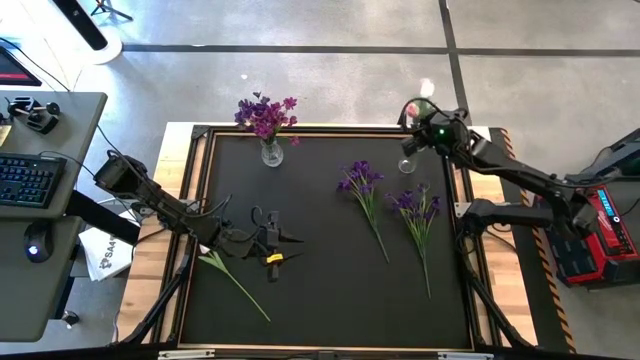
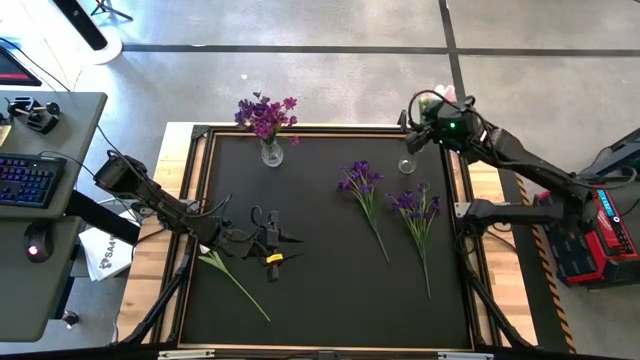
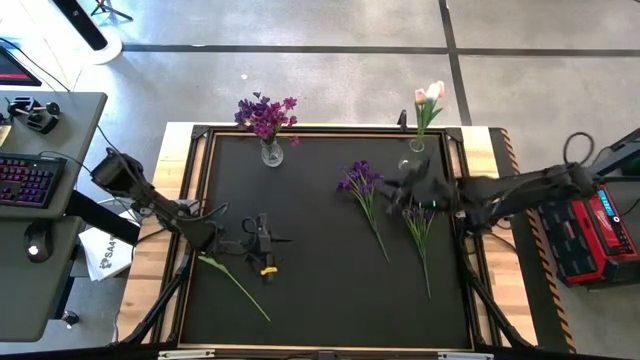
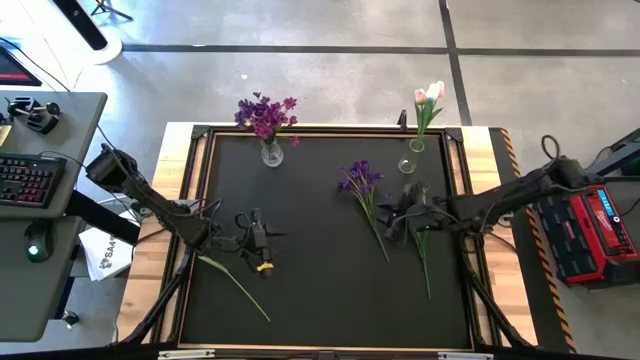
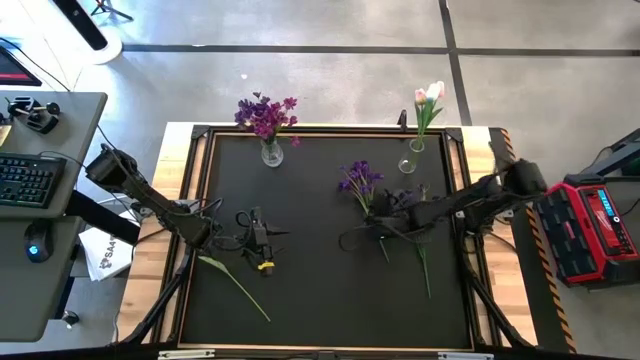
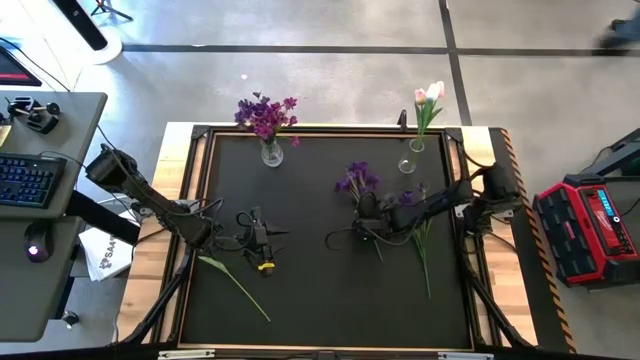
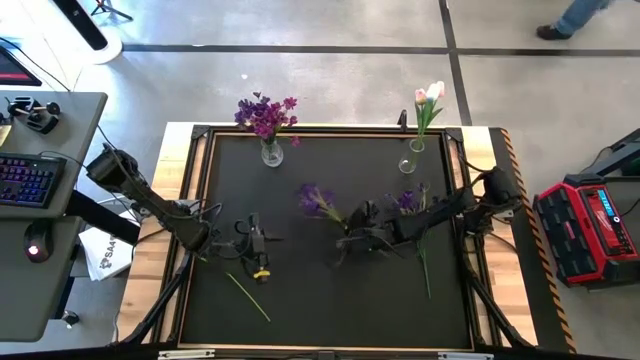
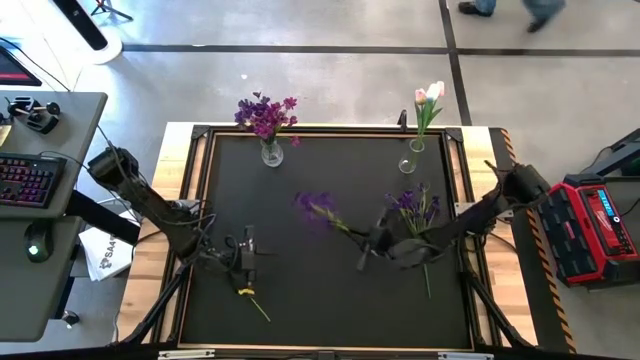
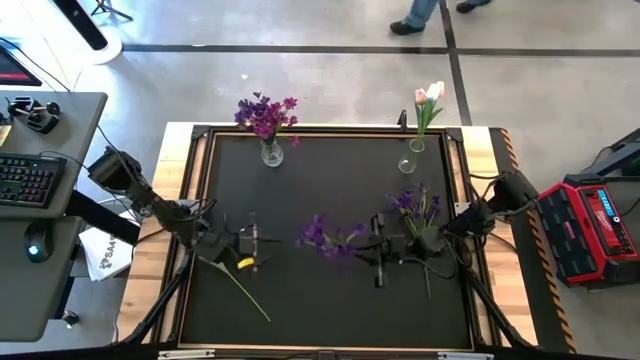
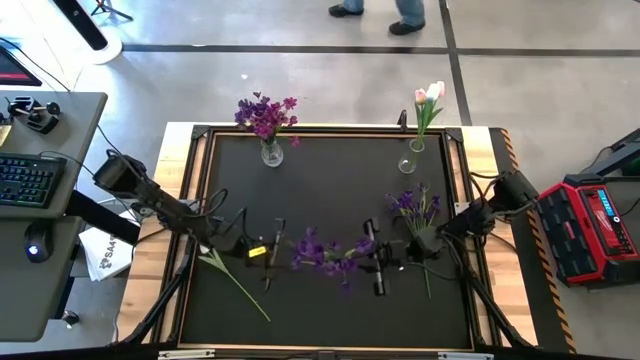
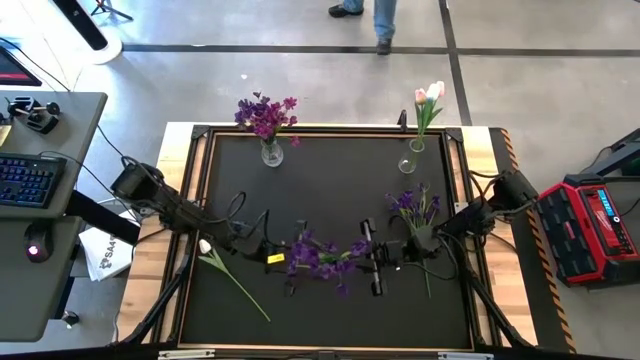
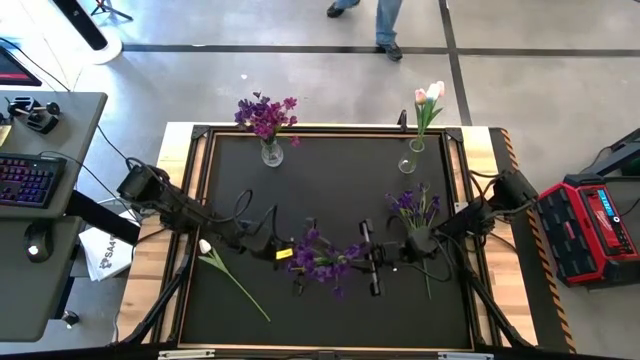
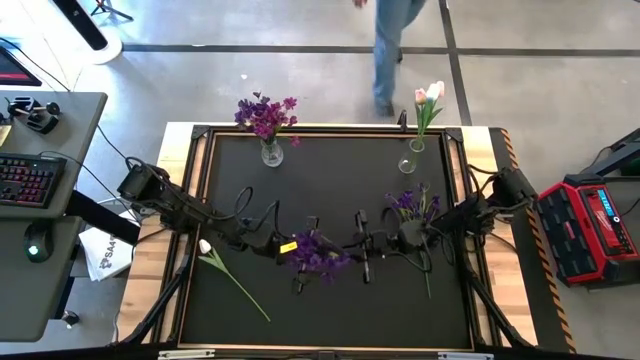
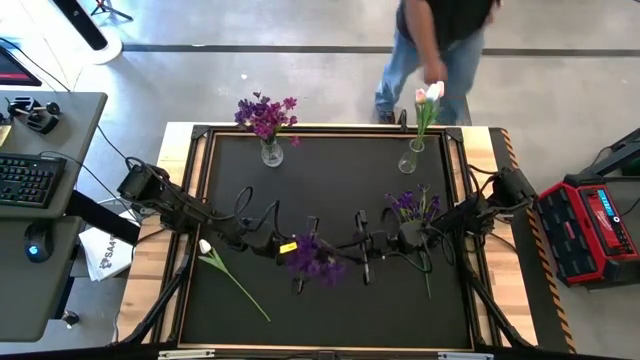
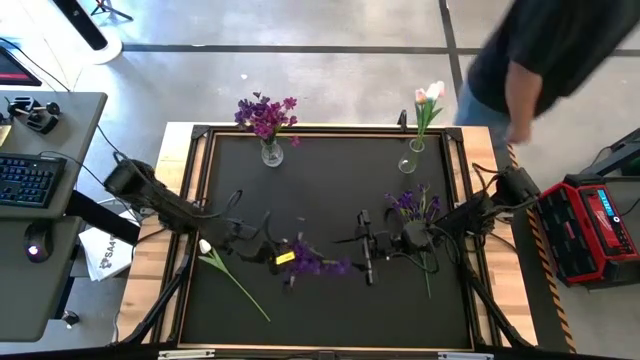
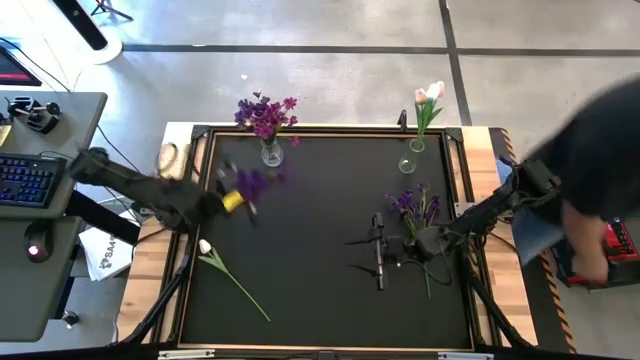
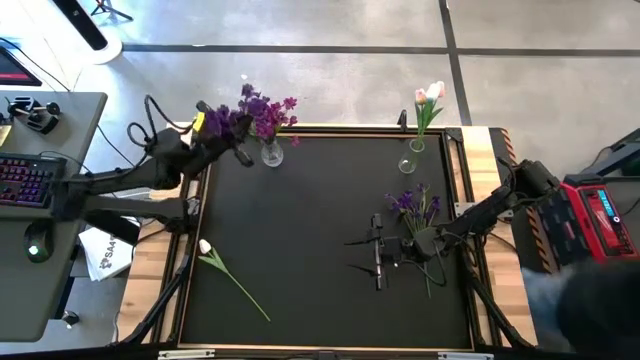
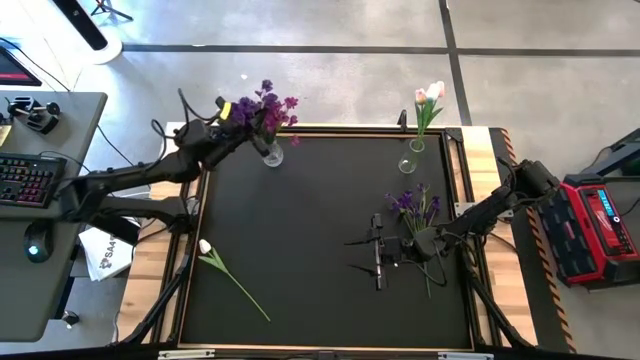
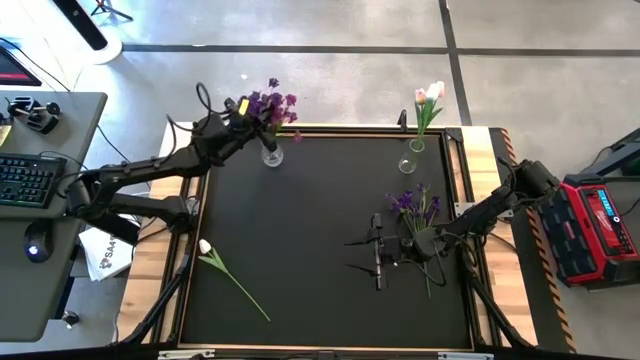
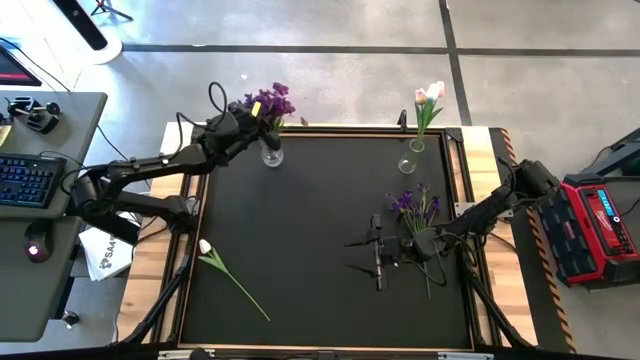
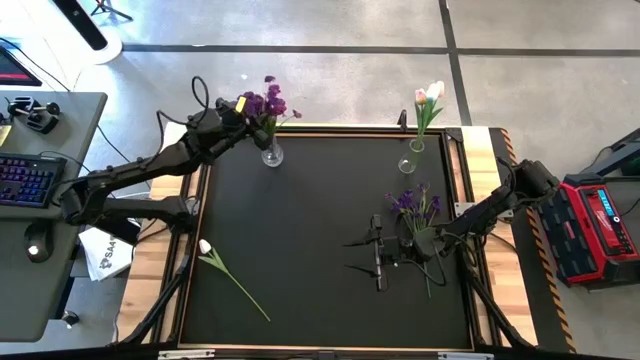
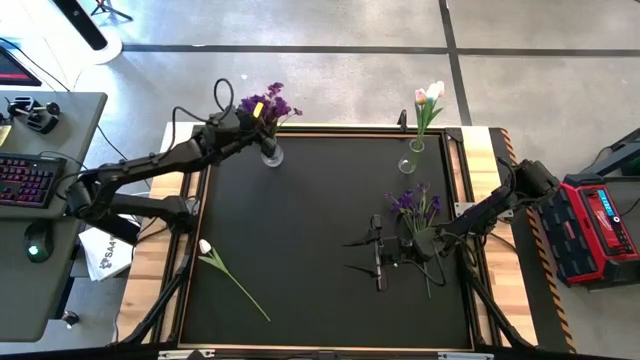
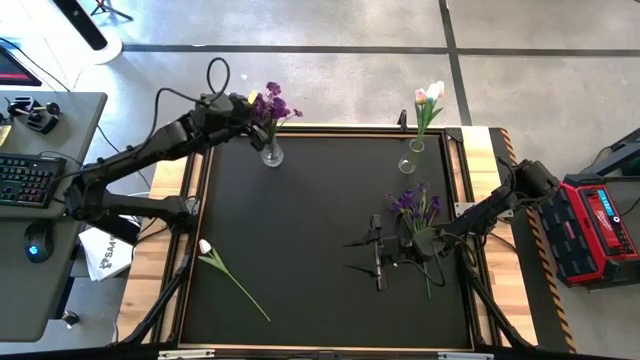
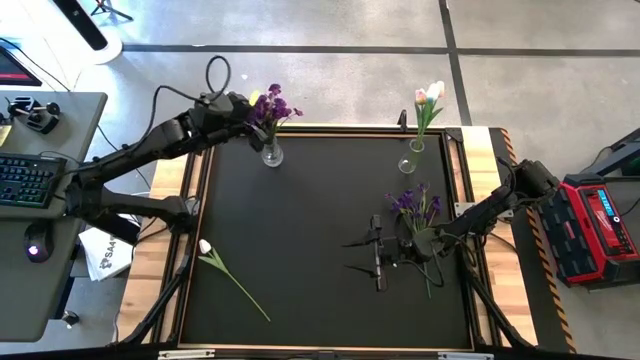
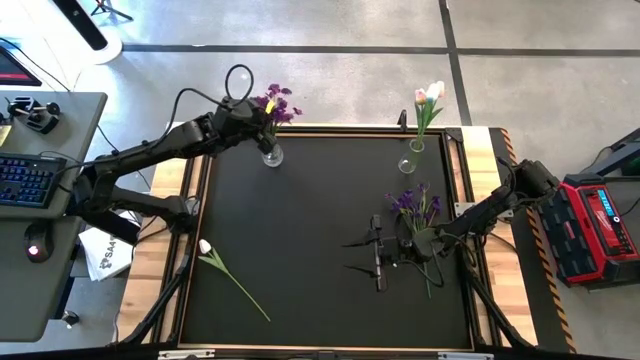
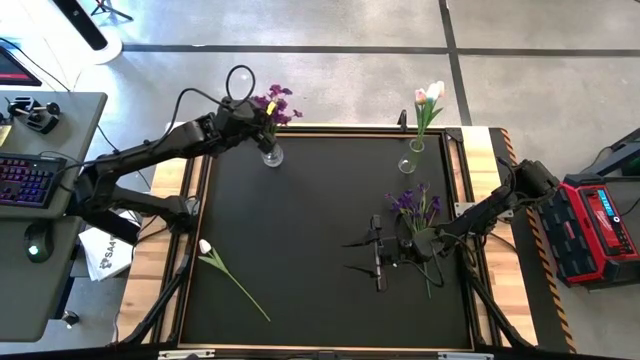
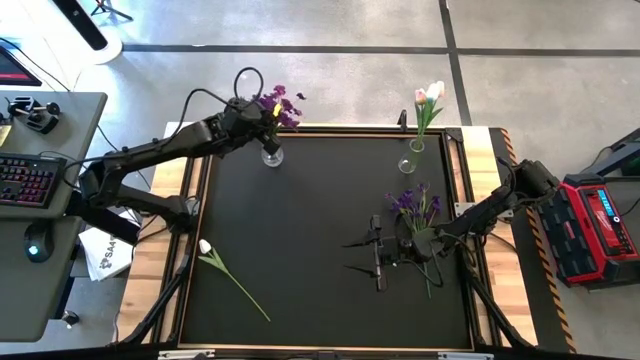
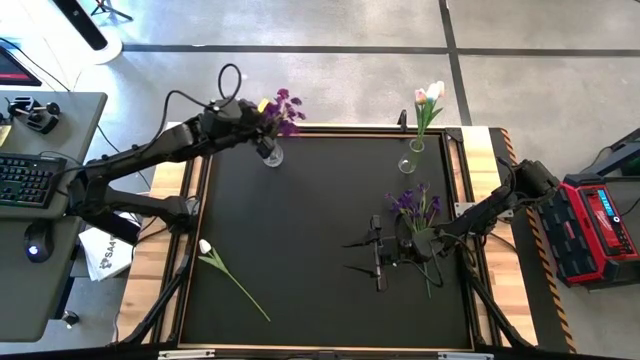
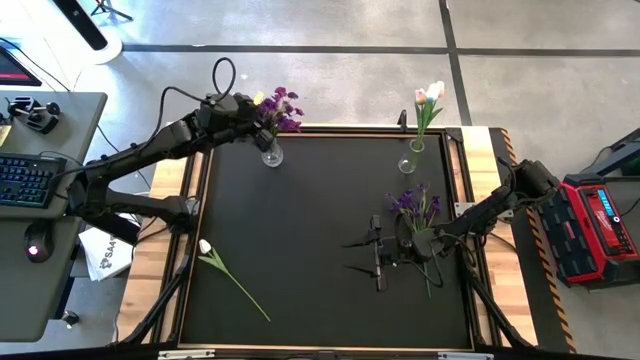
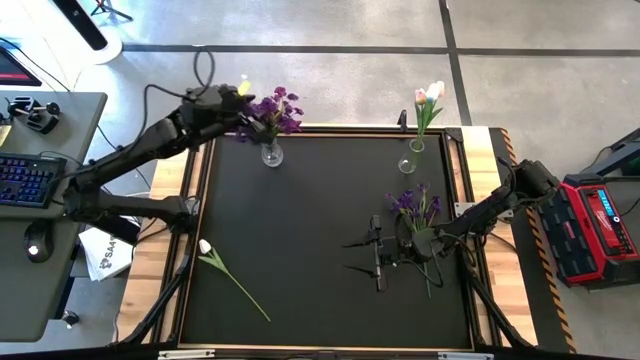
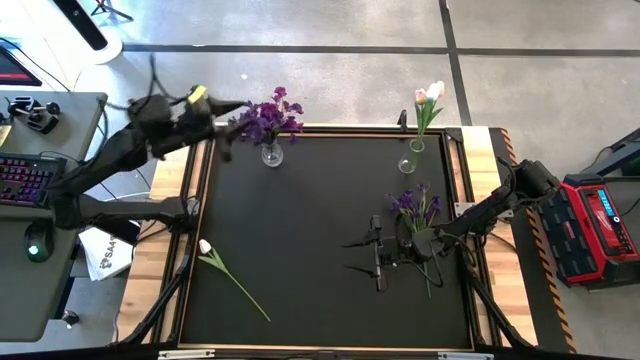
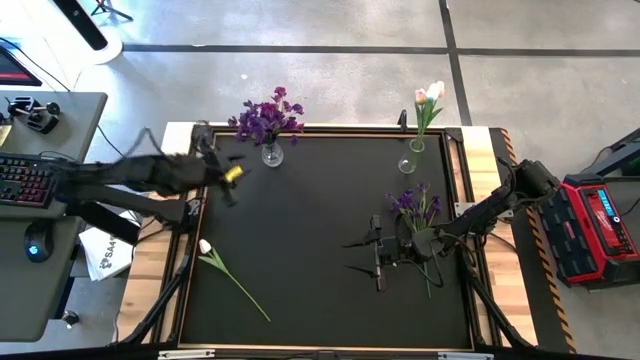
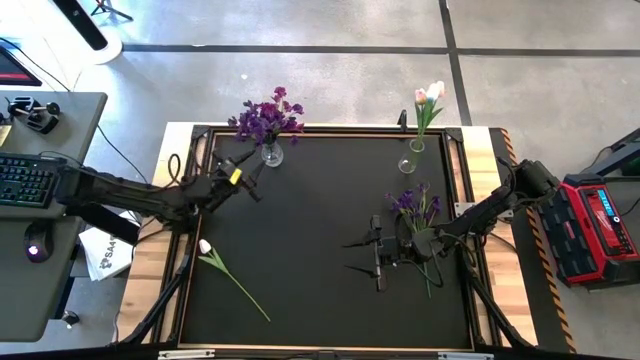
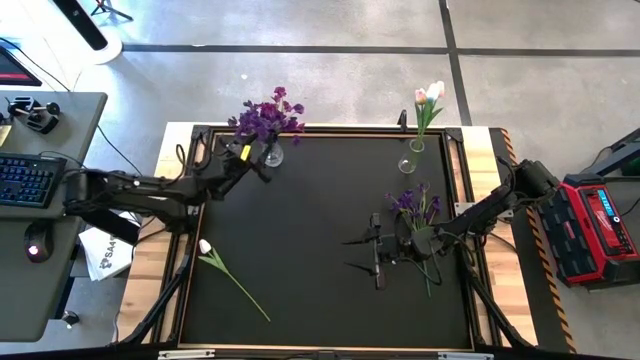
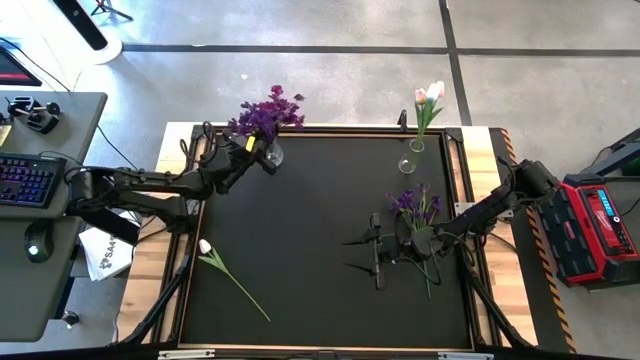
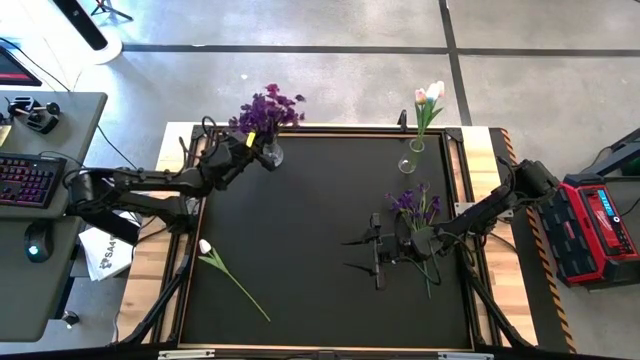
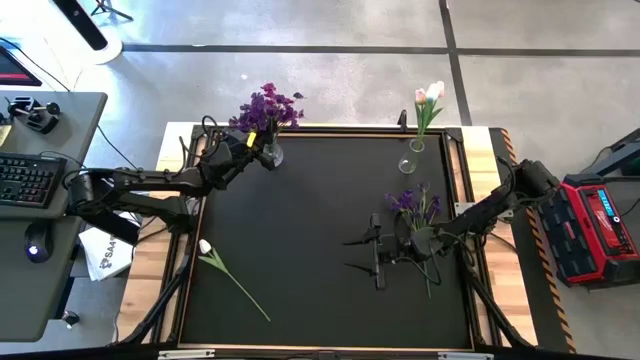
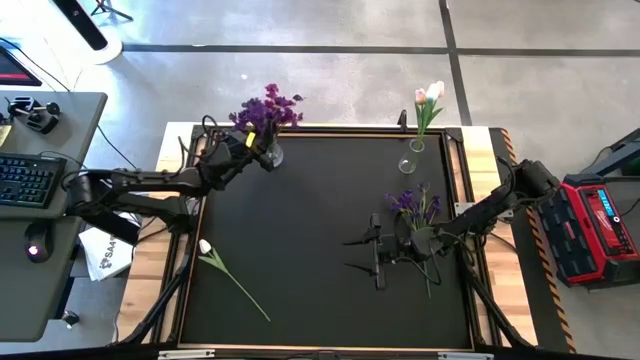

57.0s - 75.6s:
Task: Sort flowers into vase by color
Put the left violet flowers into the left transparent vase

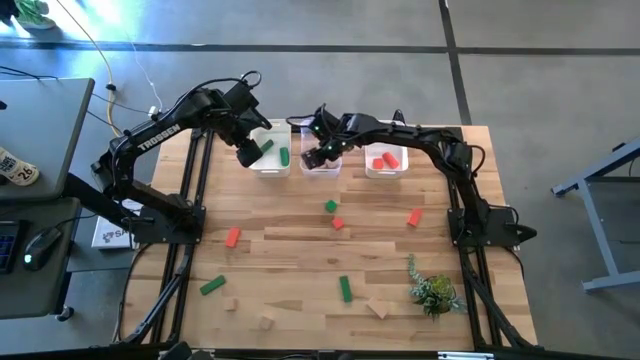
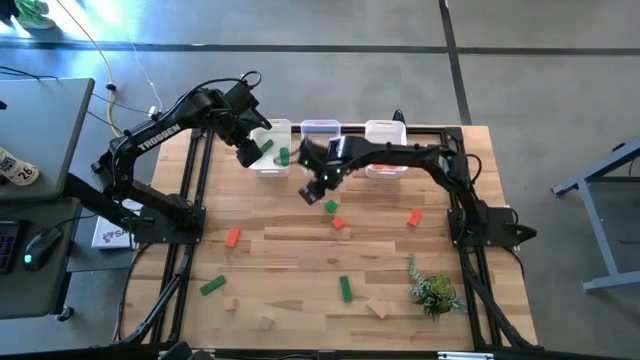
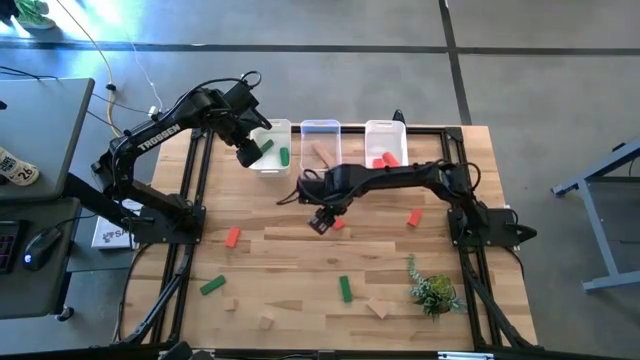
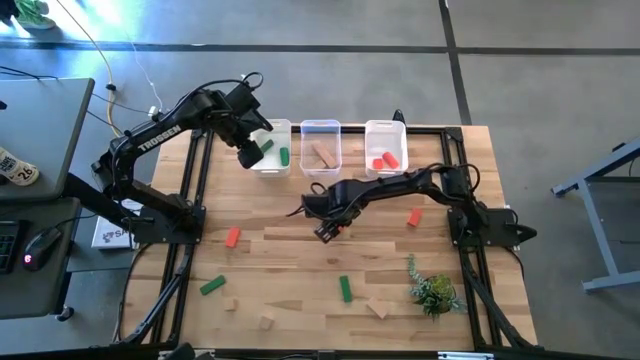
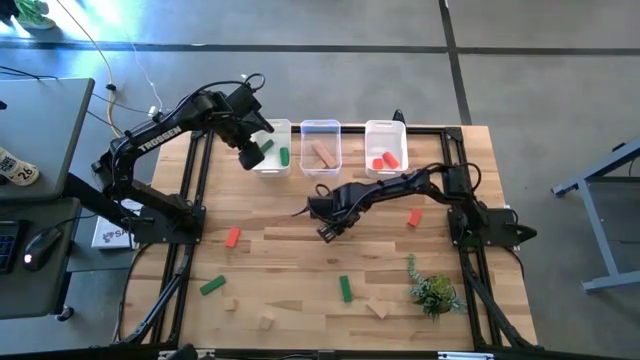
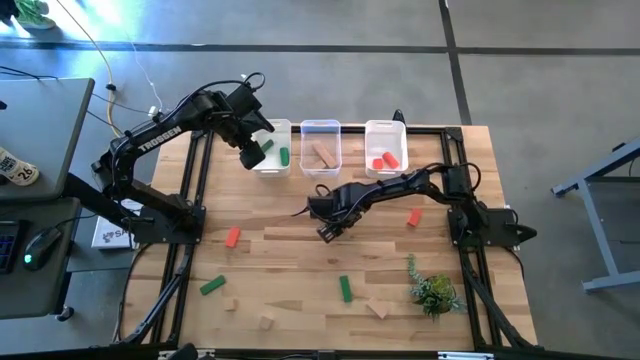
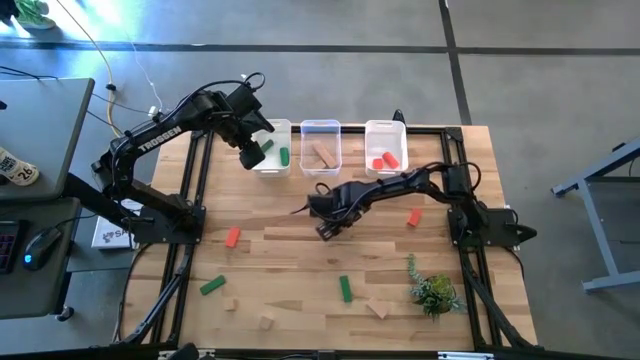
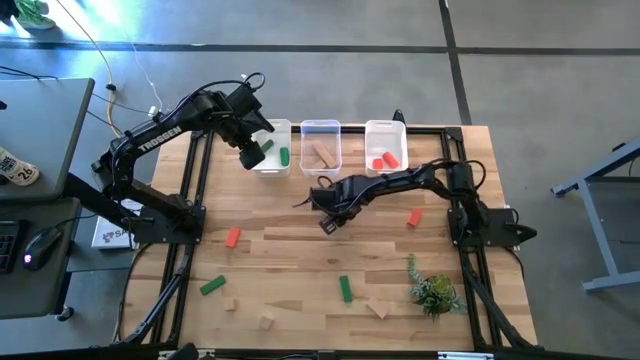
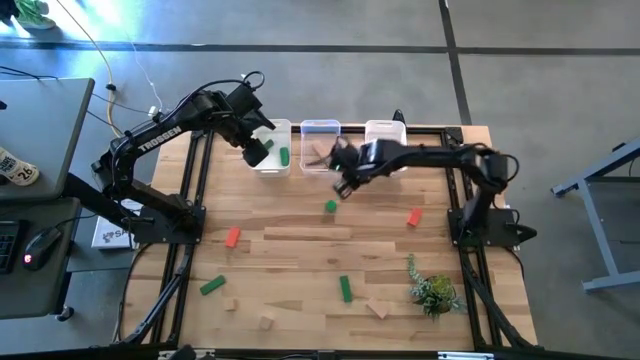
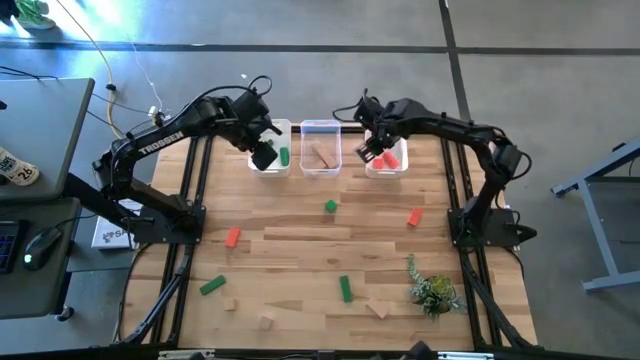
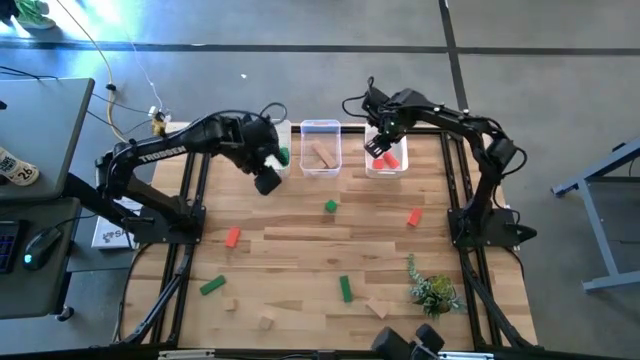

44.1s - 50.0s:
Task: Sort & place blocks by color
Put the orange block into the right white bin
